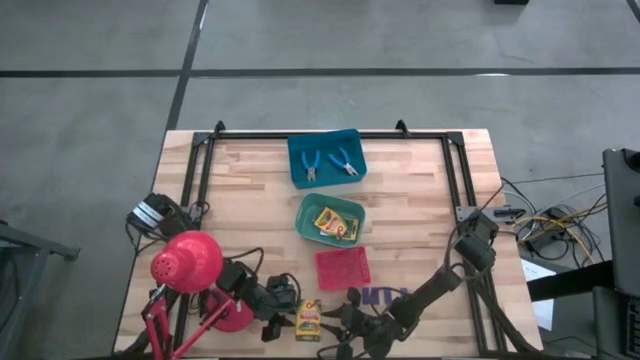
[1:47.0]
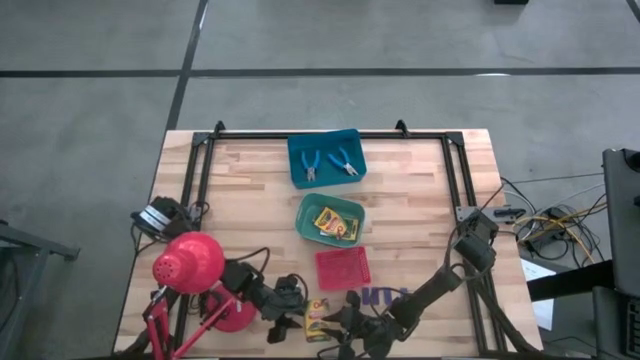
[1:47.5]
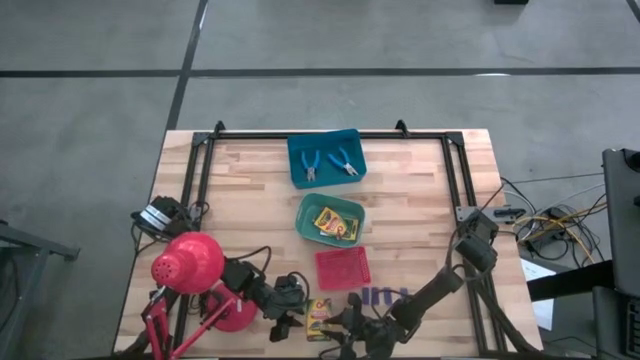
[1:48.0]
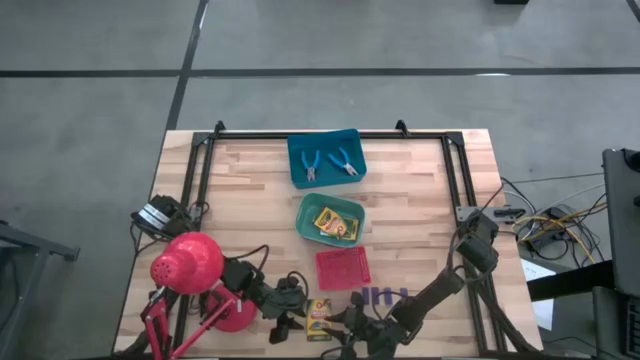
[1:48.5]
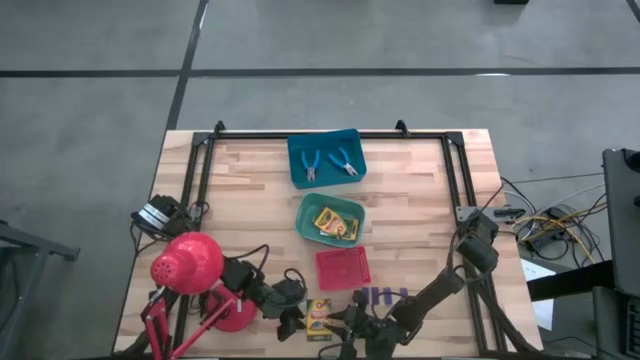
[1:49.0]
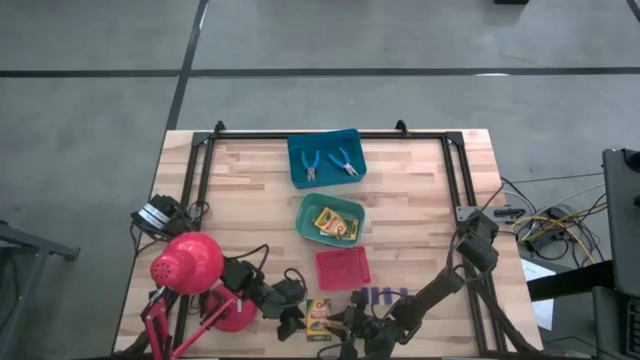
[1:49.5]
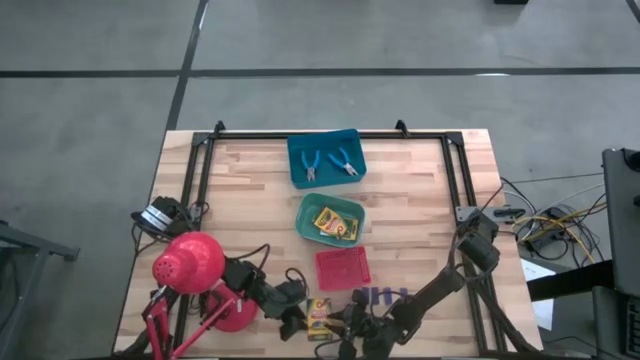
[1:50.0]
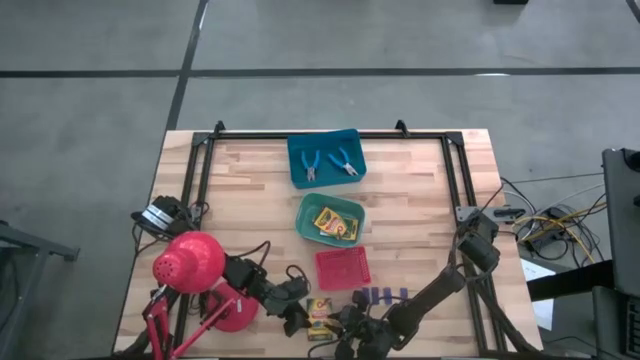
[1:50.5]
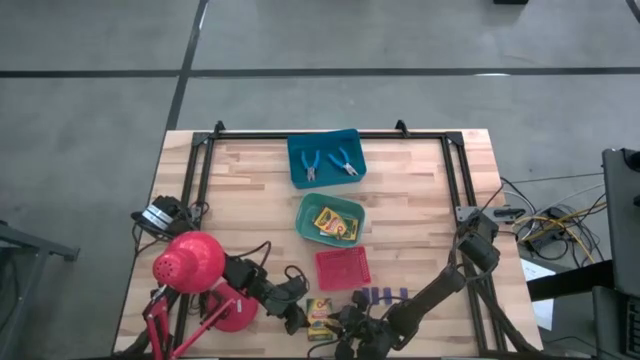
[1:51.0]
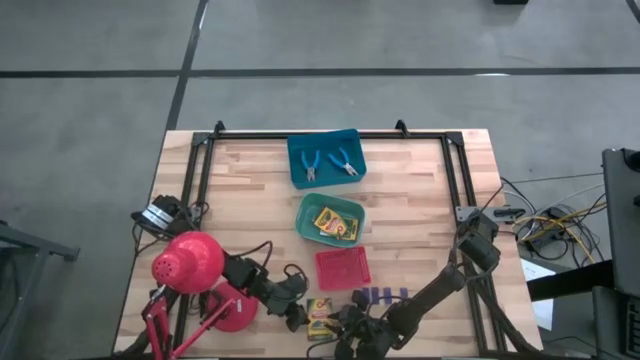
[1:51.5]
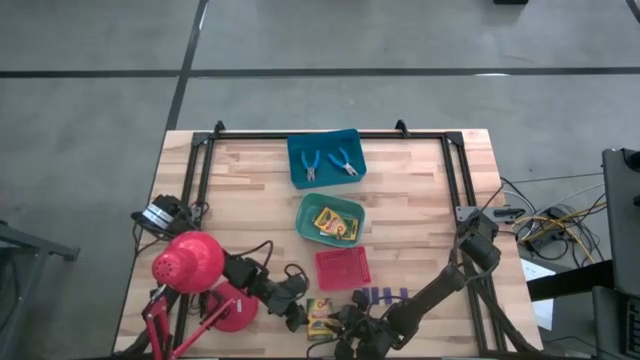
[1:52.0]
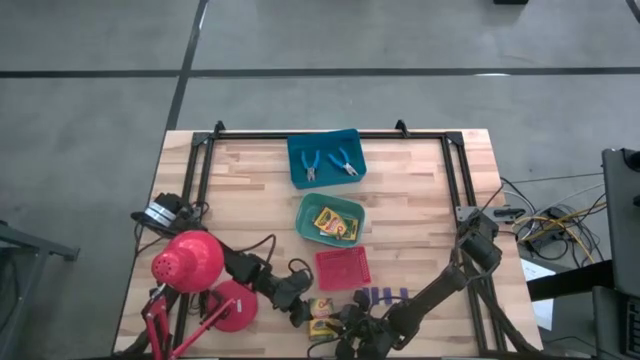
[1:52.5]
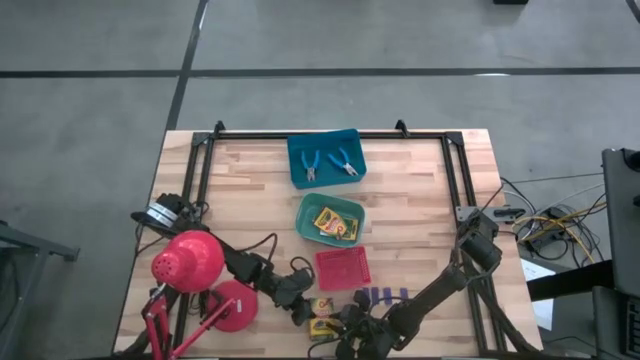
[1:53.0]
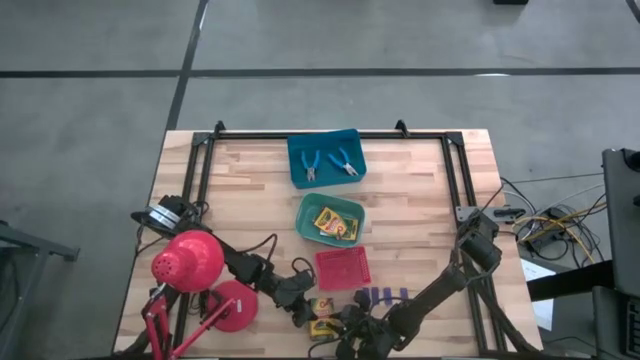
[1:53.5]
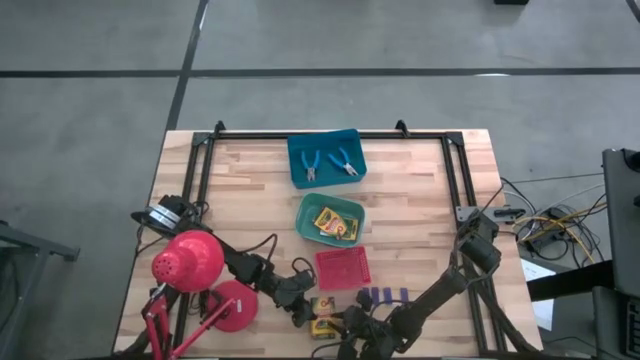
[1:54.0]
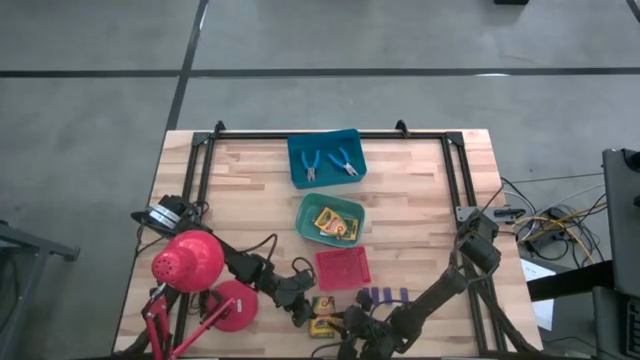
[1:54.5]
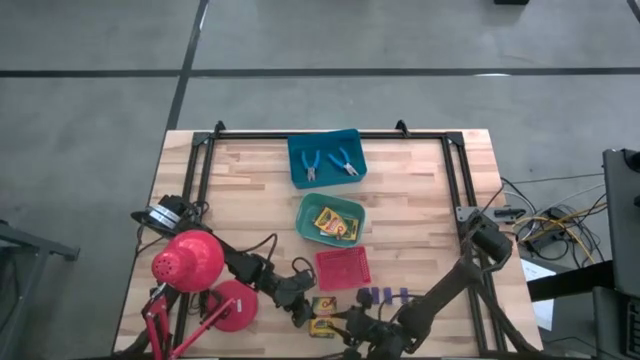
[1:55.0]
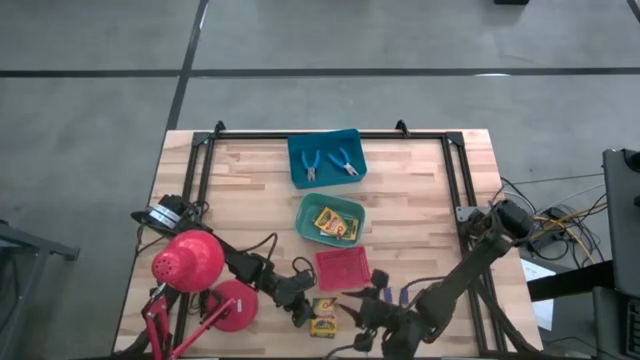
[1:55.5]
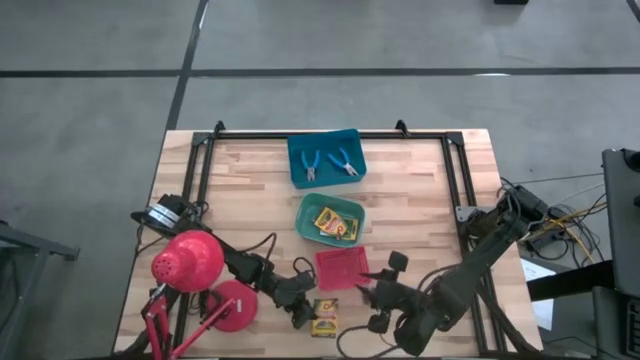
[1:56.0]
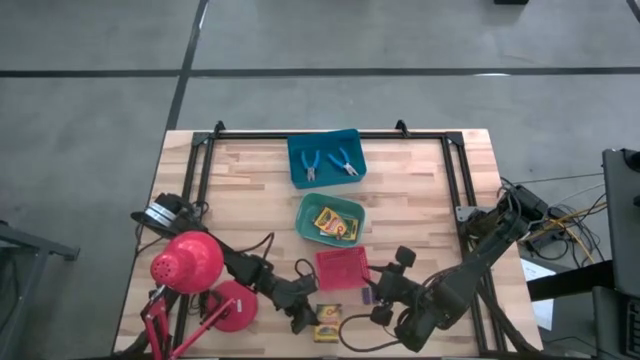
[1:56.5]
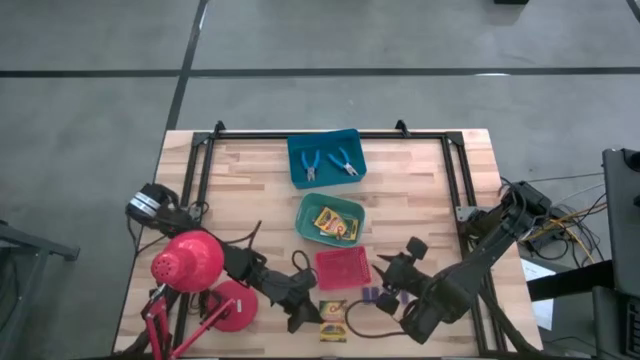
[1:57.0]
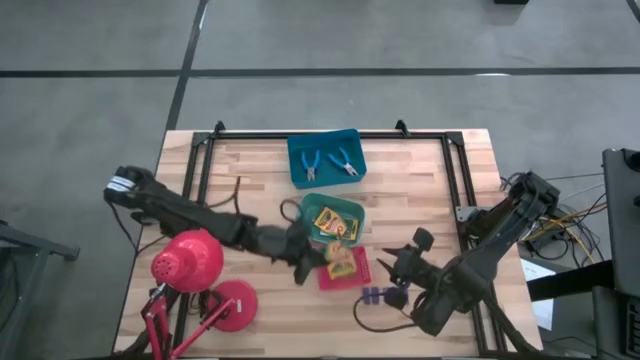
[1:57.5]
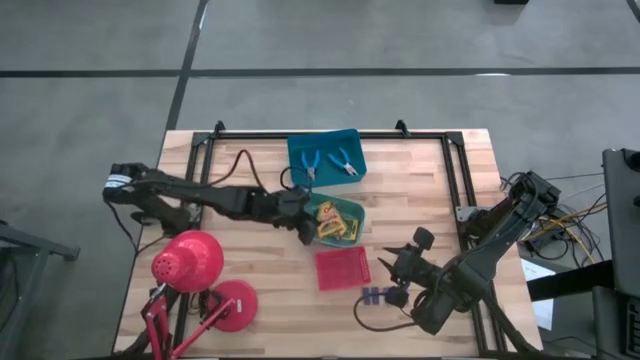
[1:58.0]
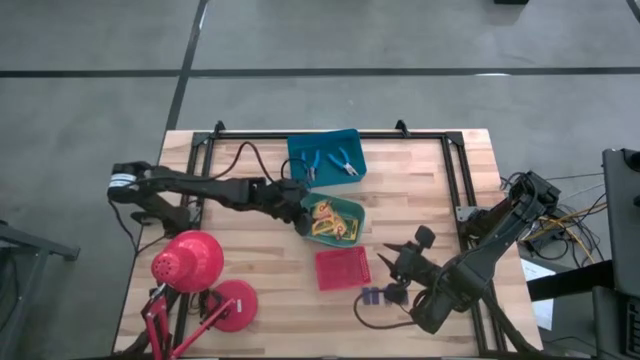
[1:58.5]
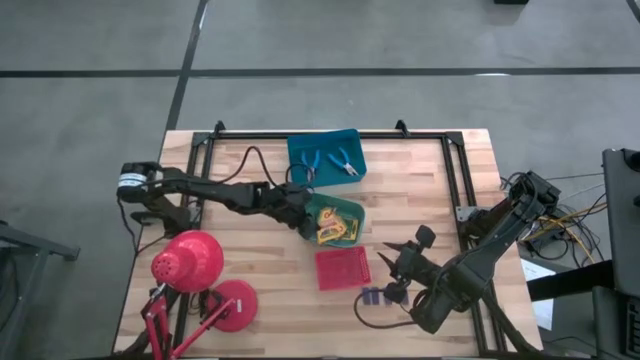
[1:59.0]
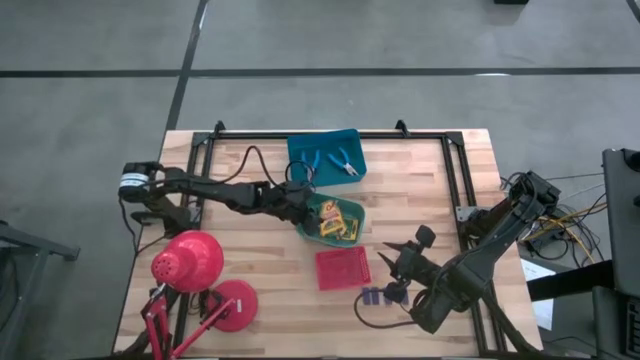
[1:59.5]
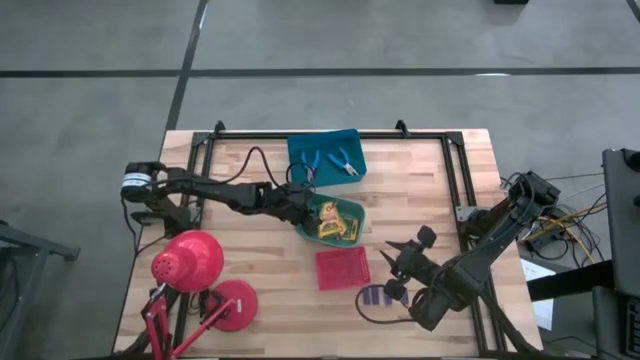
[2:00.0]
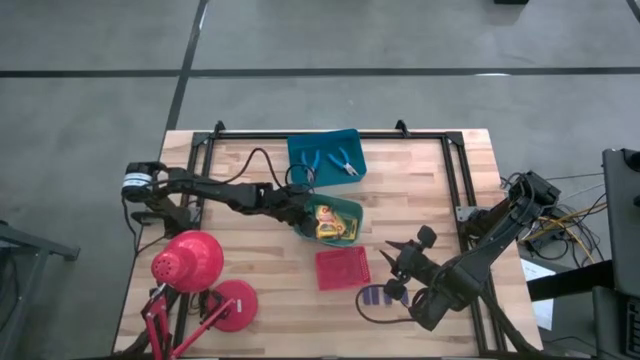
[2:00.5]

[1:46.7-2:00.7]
Task: Pick & Place School Supplies
Put the yellow crayon box in the green bin
